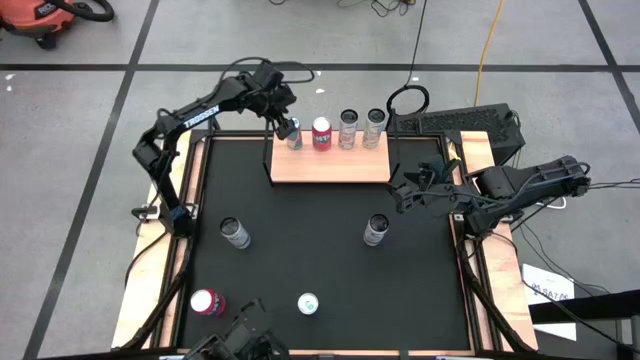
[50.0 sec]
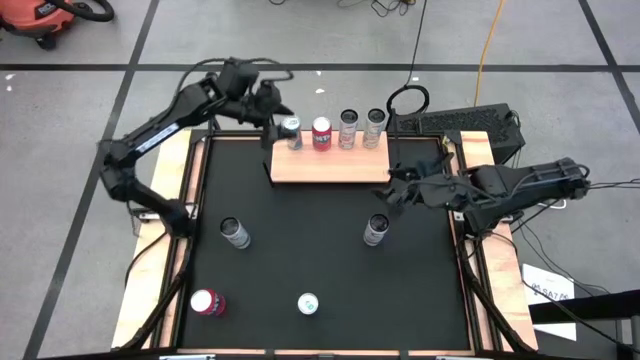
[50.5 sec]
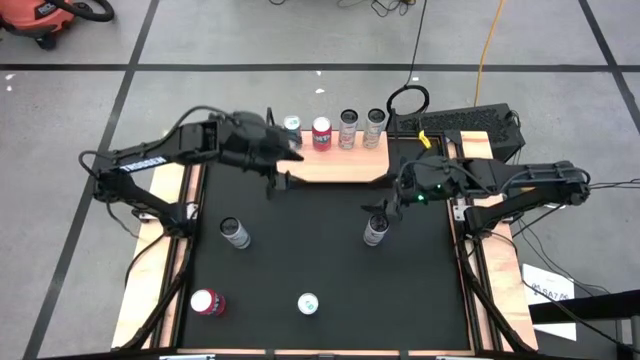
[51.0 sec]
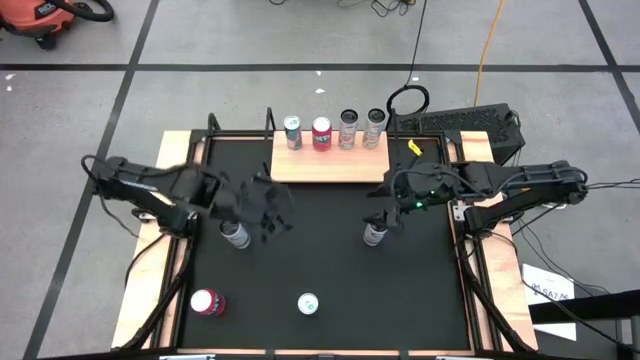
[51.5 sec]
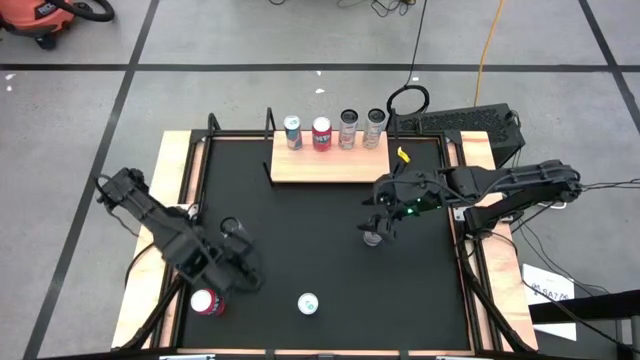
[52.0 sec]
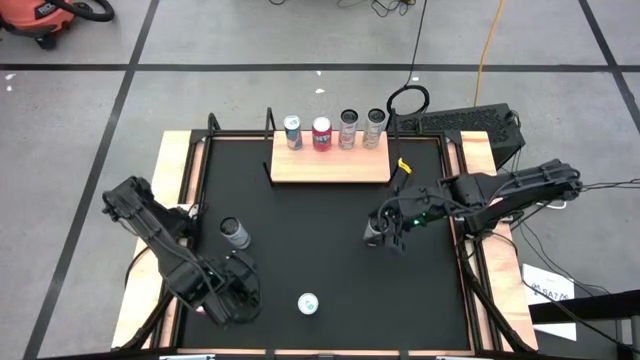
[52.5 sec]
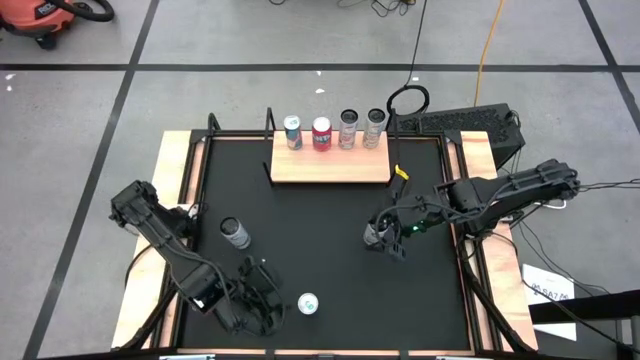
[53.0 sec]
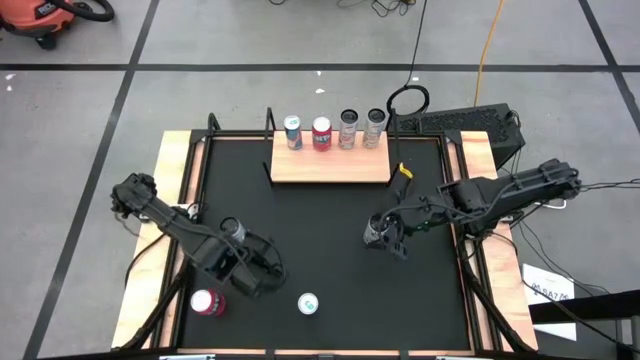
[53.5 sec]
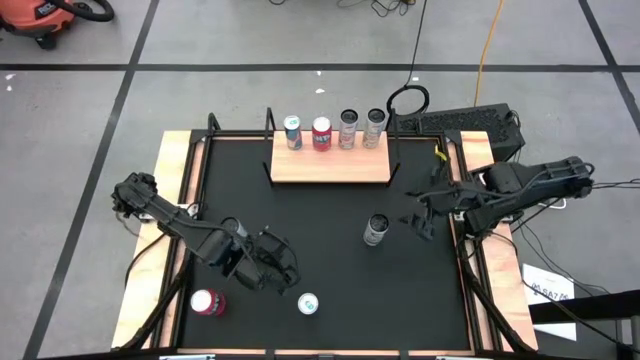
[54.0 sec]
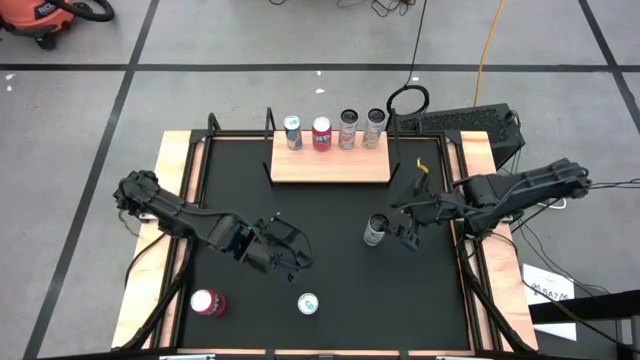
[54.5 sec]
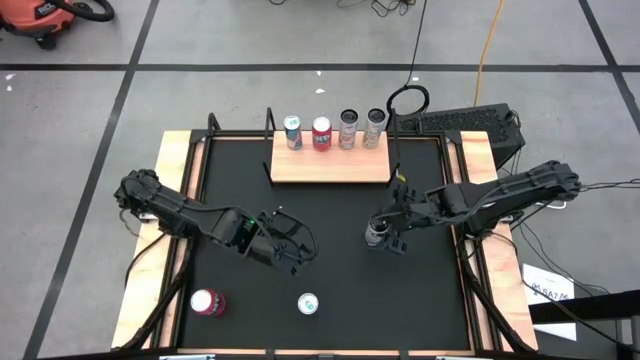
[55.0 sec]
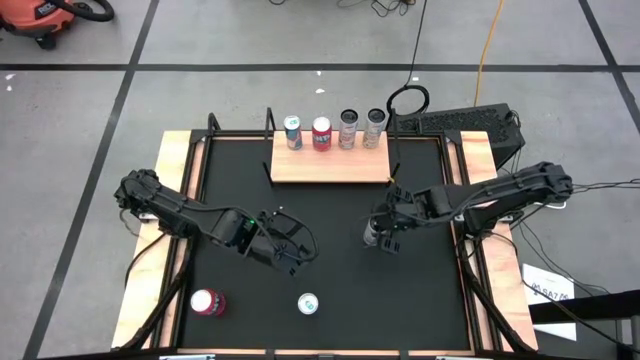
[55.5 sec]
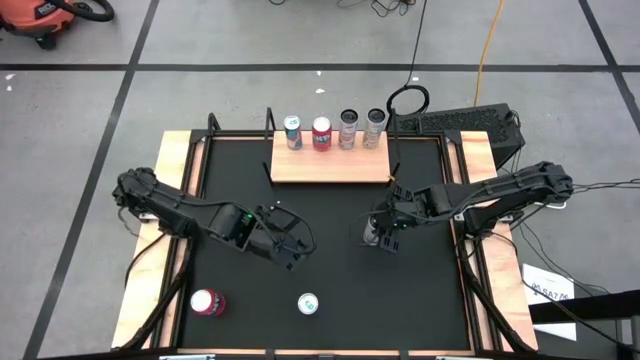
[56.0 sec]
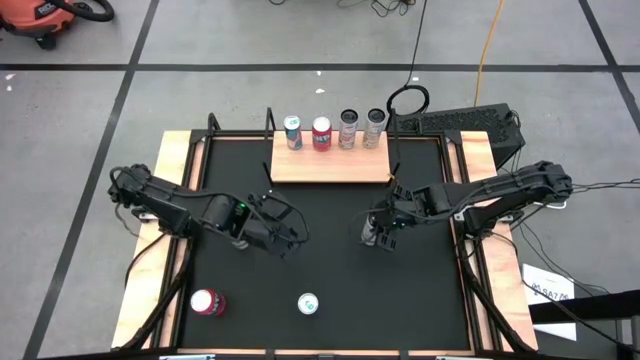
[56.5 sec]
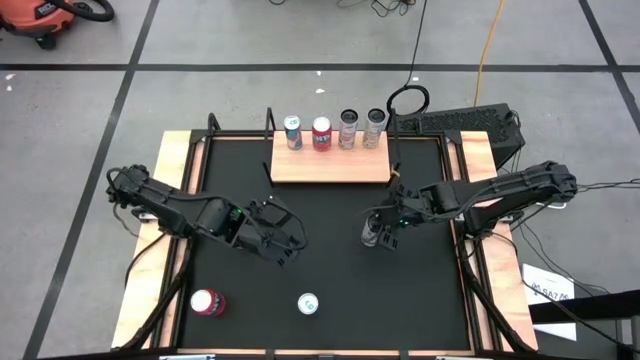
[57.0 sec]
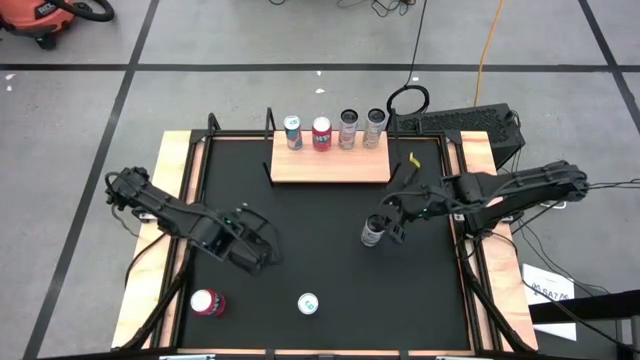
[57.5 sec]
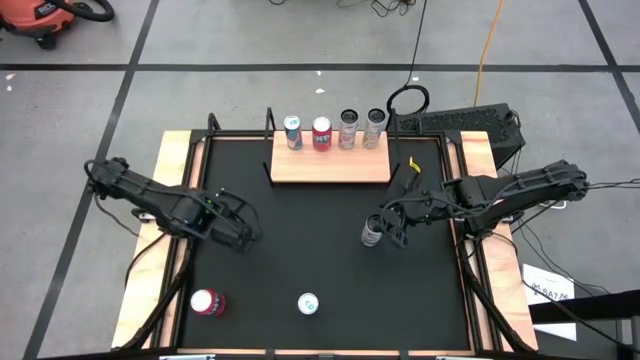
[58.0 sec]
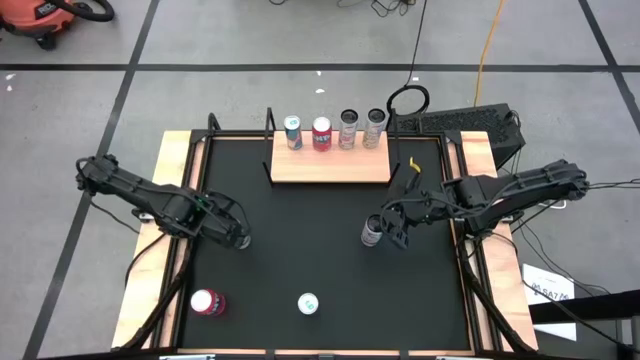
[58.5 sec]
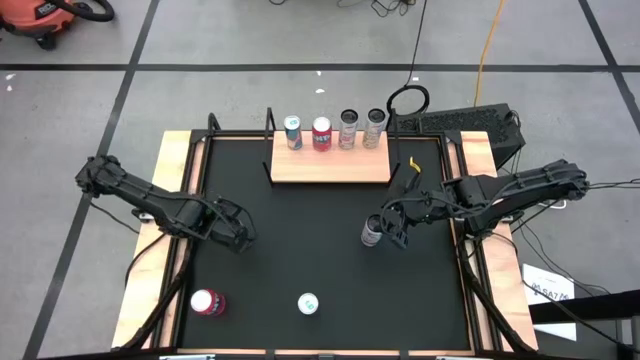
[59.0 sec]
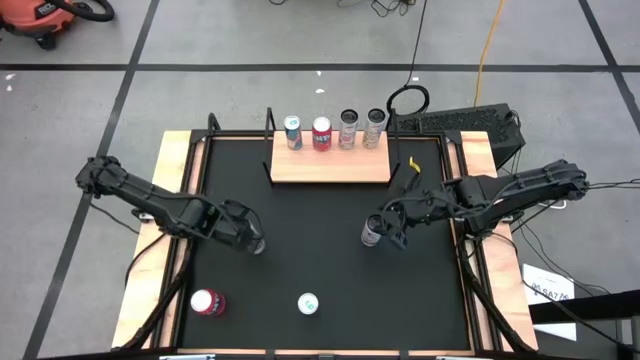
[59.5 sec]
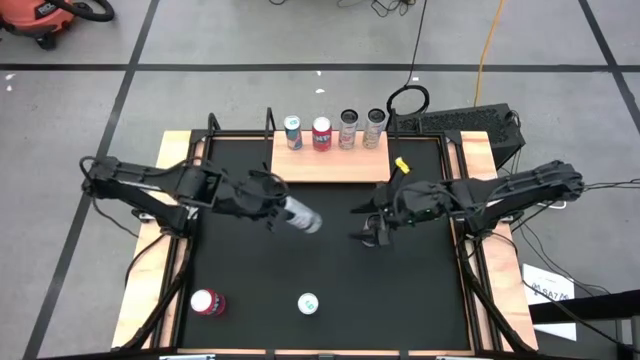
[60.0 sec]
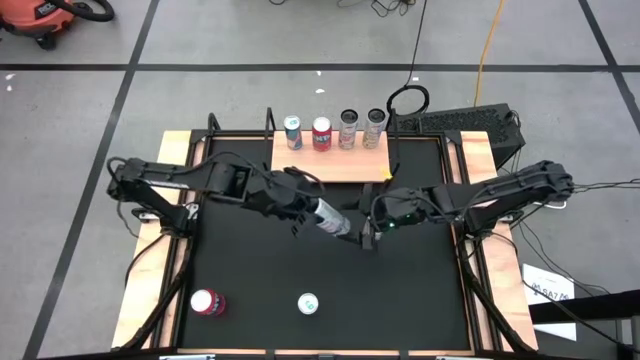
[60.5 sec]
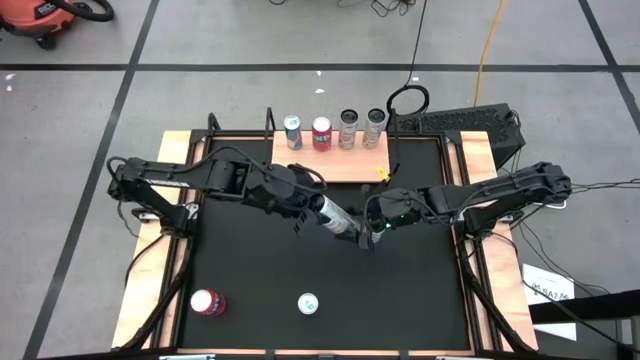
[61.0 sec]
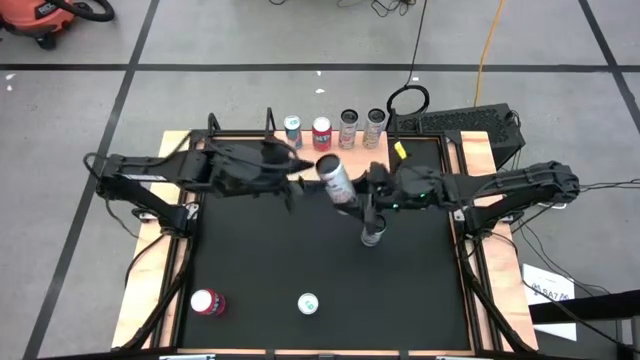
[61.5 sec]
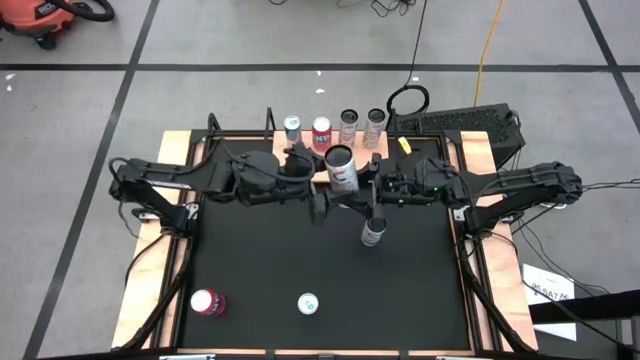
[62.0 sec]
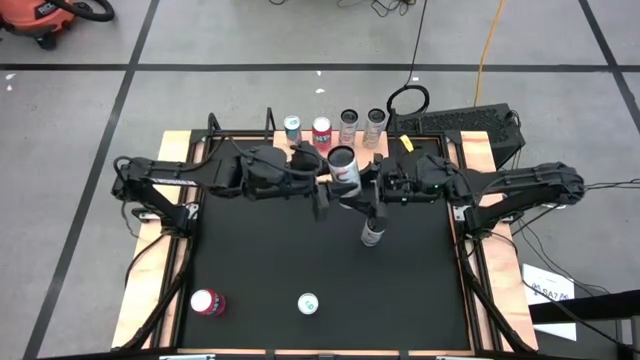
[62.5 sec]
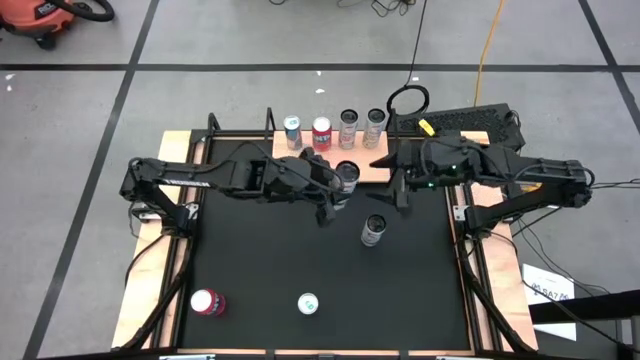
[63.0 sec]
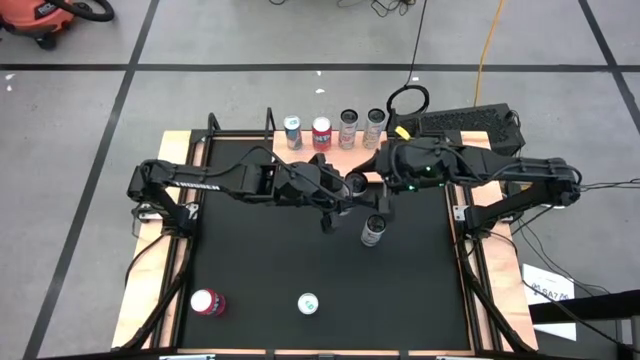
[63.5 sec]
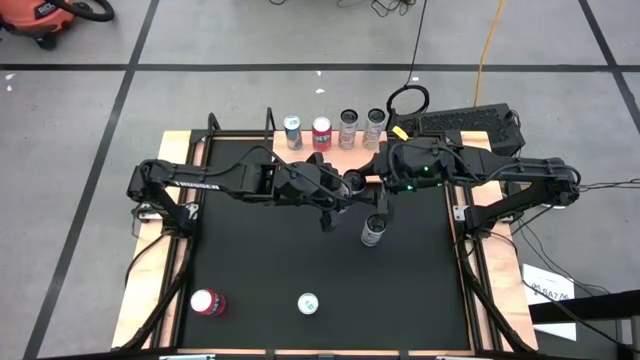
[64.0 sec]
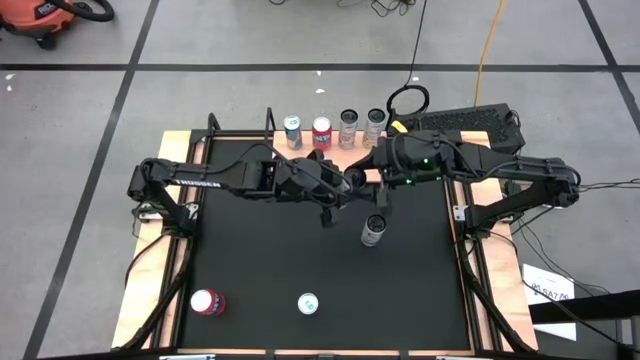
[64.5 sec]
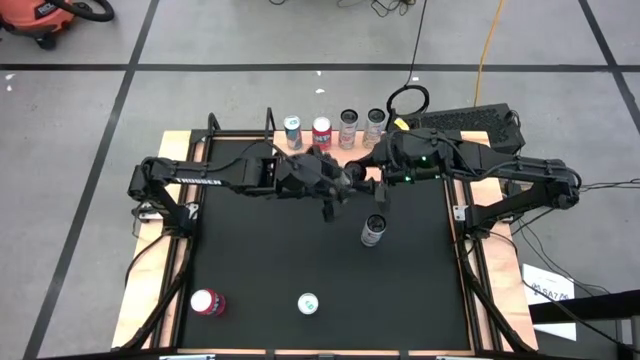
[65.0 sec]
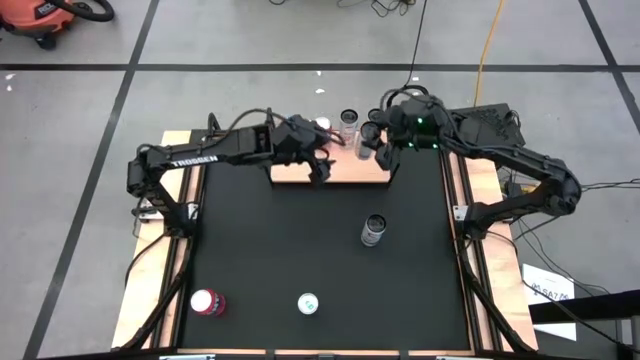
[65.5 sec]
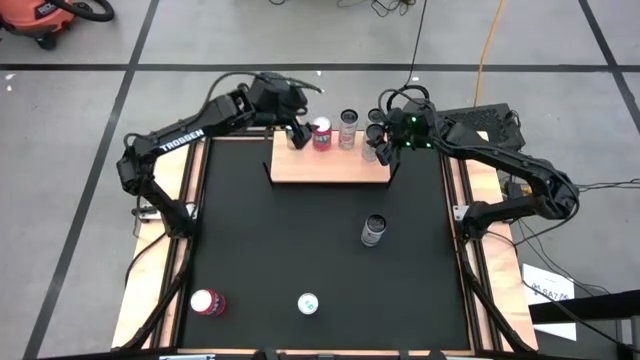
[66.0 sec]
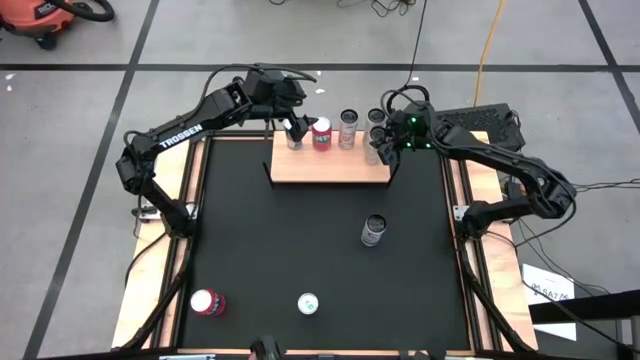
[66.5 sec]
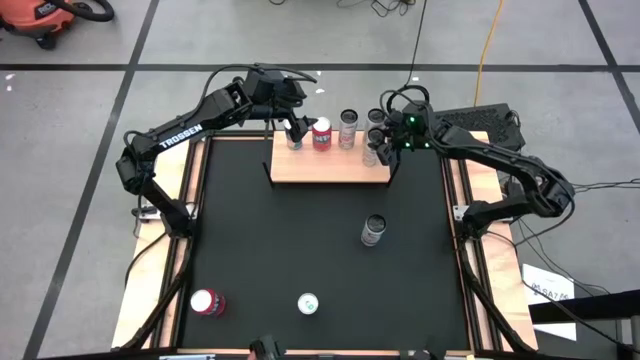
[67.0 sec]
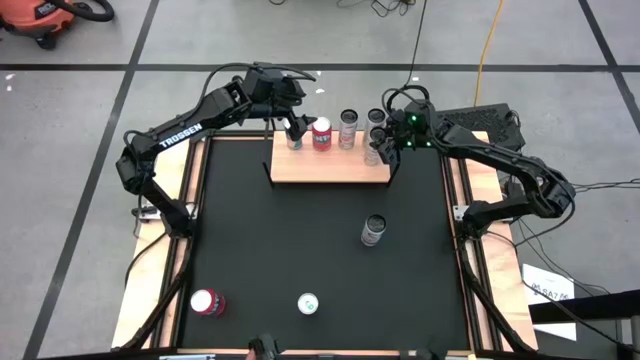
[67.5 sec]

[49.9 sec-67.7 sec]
Task: Place canned beverage on shelf
Put the left white soda can on the shelf aligned with the other white soda can

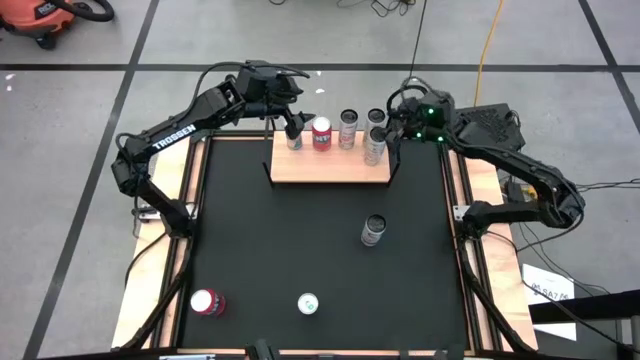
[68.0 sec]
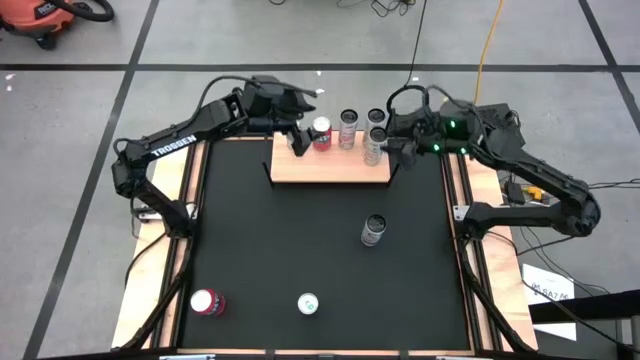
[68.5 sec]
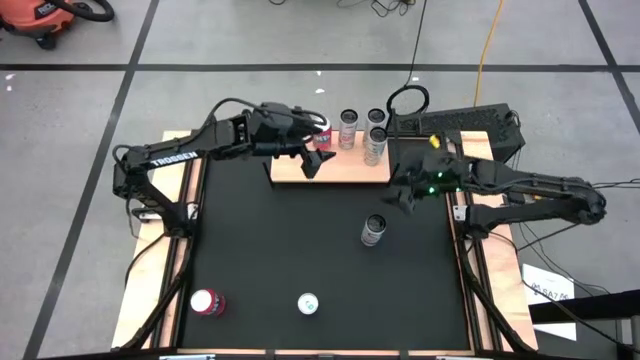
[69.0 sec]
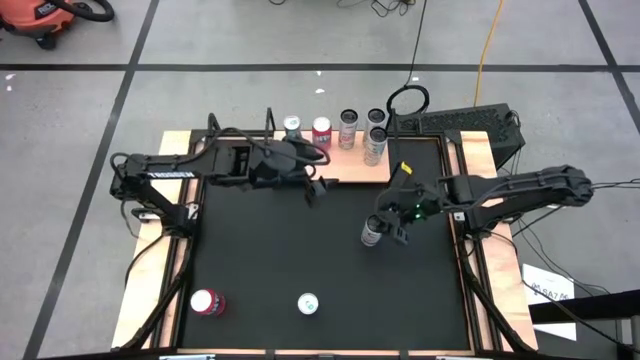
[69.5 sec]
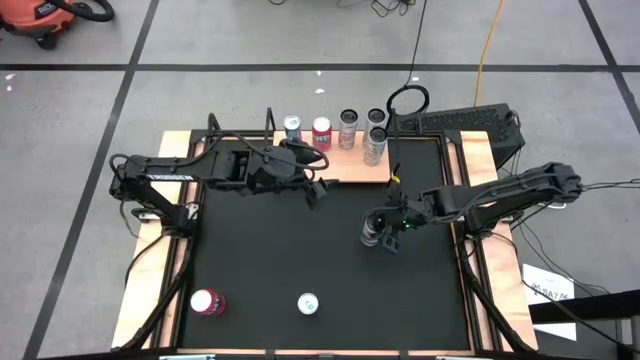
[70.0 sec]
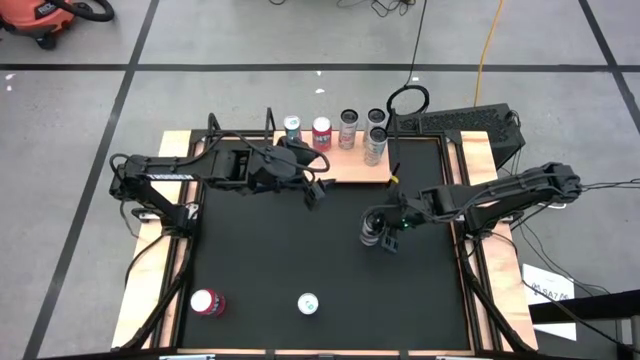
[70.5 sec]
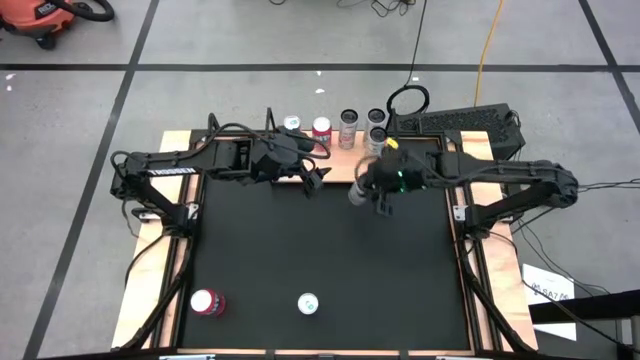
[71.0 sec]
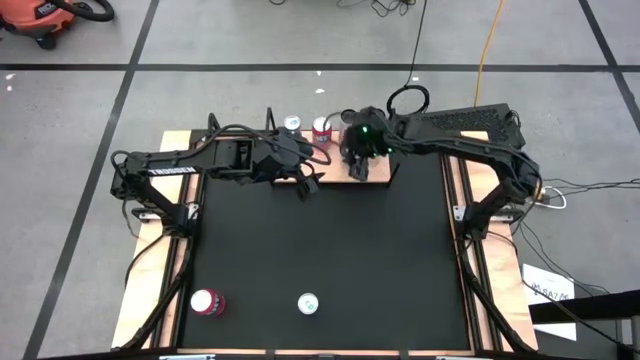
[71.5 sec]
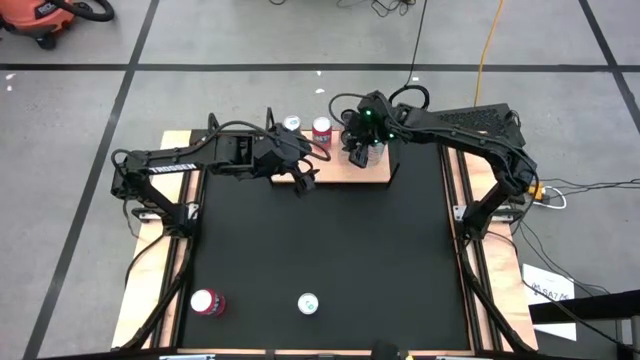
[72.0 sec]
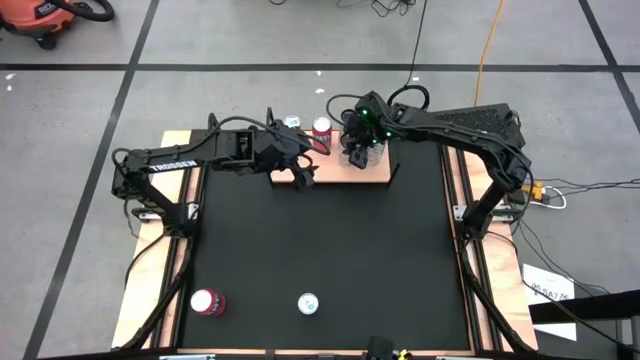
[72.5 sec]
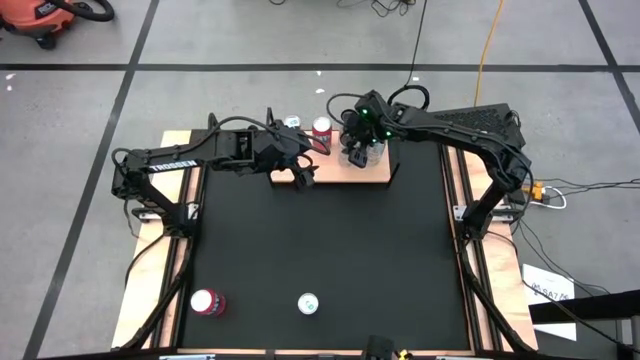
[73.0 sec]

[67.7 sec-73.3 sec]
Put the white soda can on the shelf aligned with the other white soda cans
